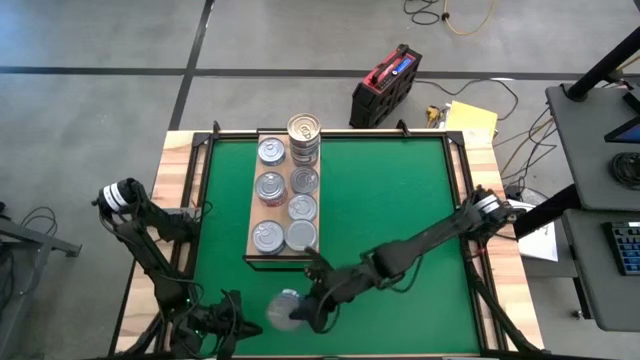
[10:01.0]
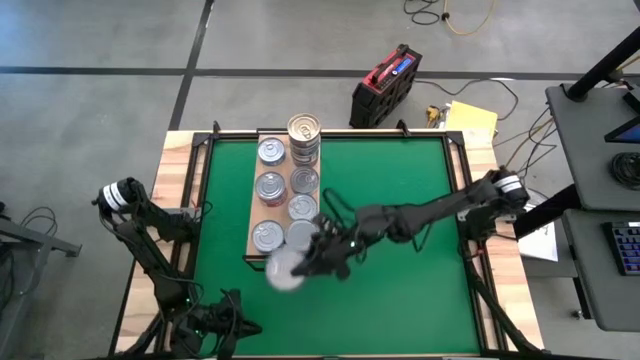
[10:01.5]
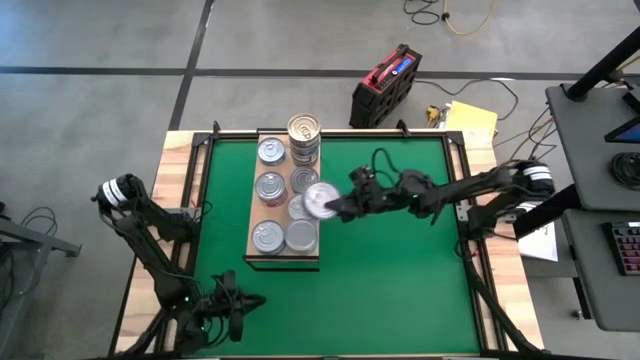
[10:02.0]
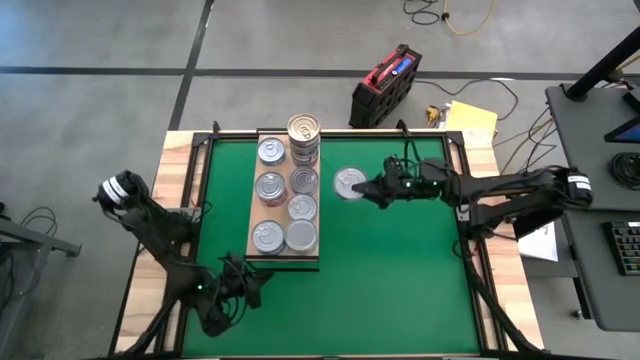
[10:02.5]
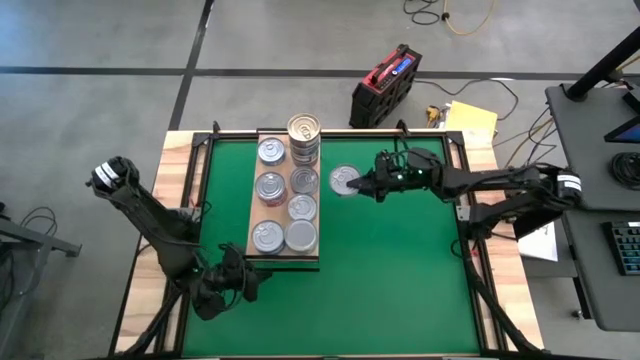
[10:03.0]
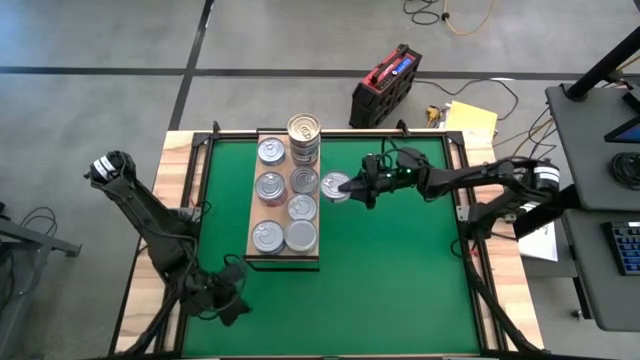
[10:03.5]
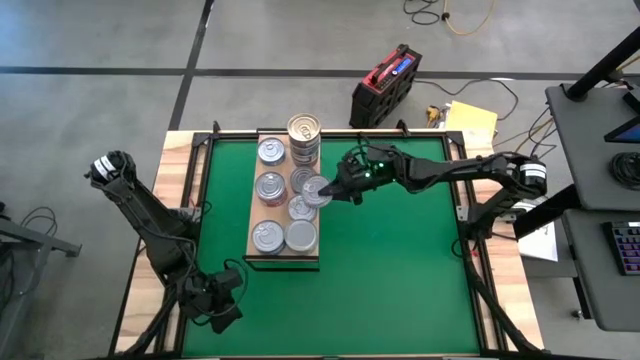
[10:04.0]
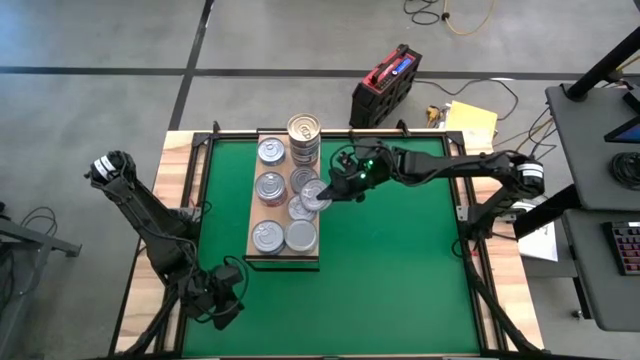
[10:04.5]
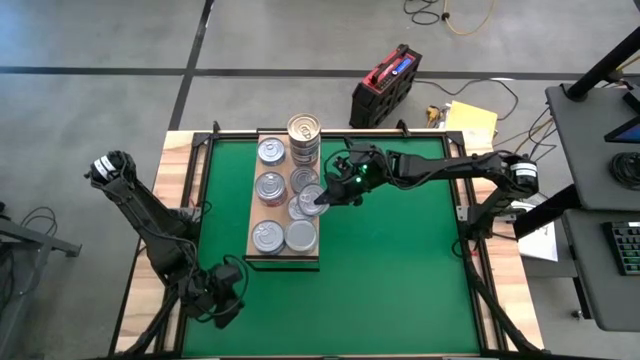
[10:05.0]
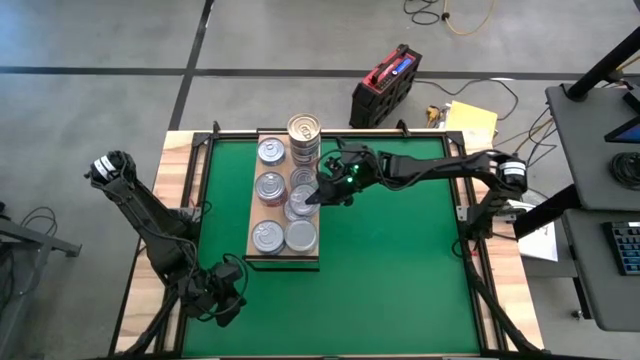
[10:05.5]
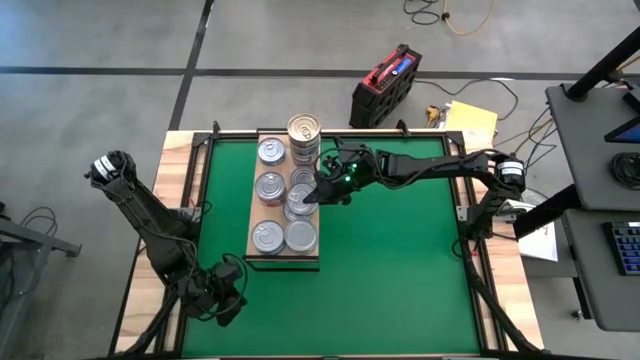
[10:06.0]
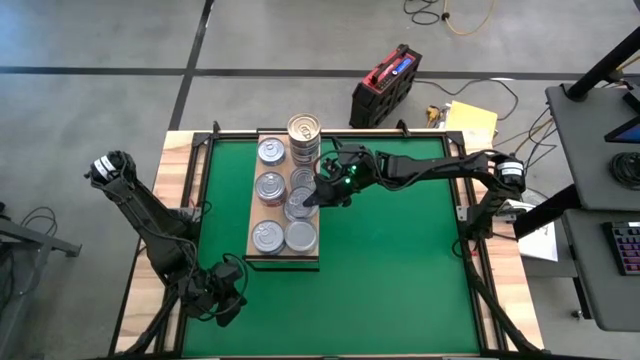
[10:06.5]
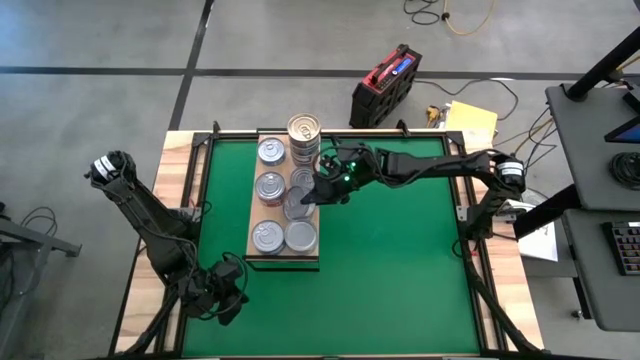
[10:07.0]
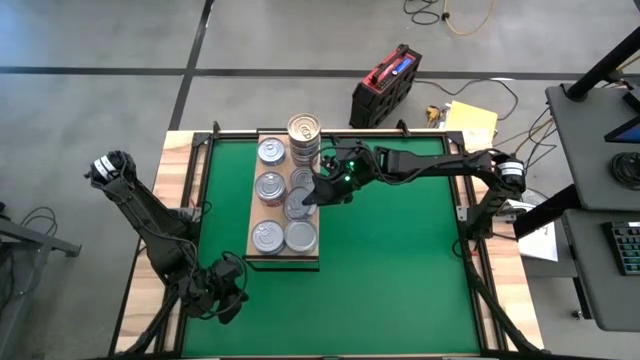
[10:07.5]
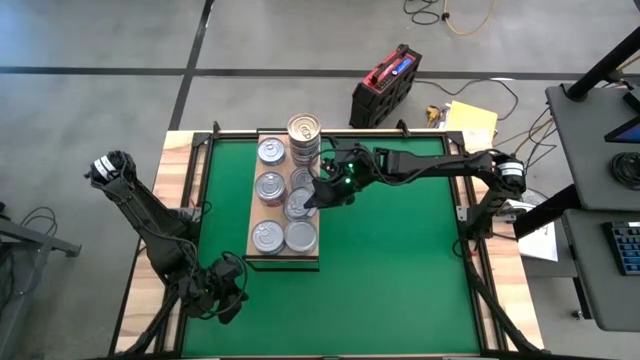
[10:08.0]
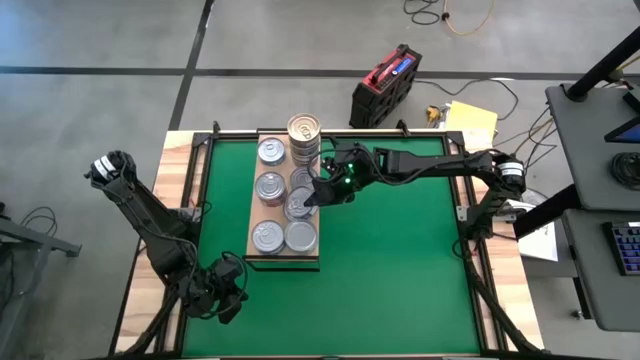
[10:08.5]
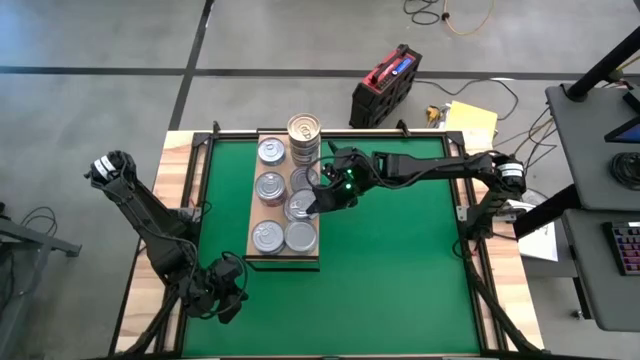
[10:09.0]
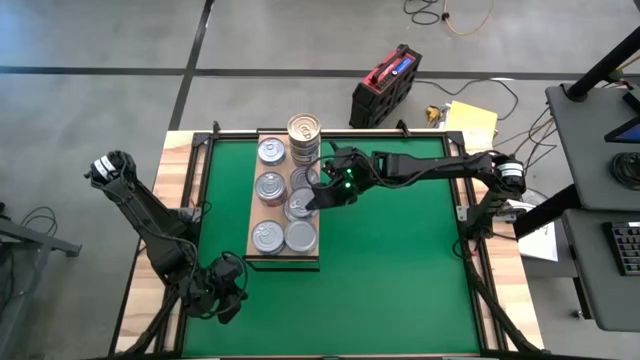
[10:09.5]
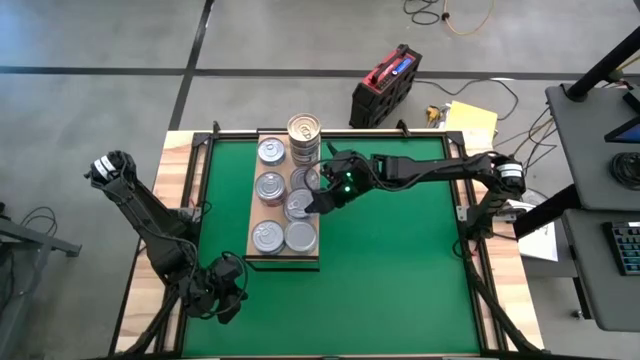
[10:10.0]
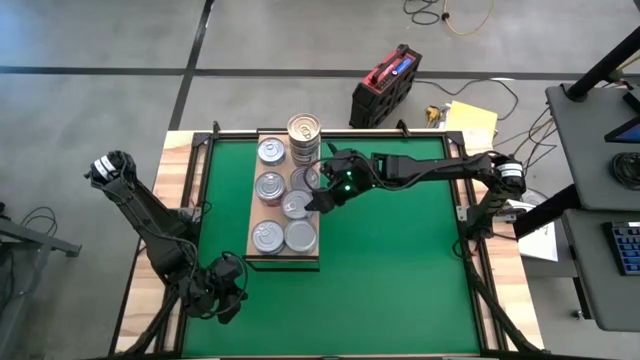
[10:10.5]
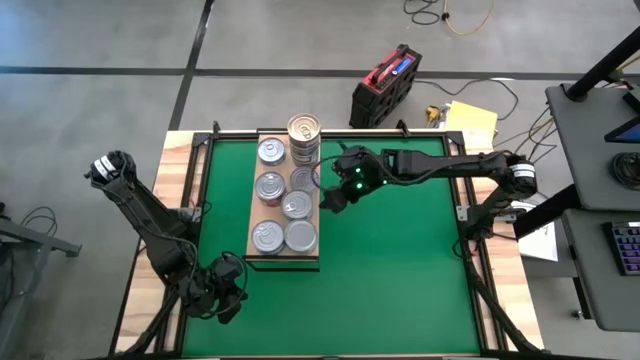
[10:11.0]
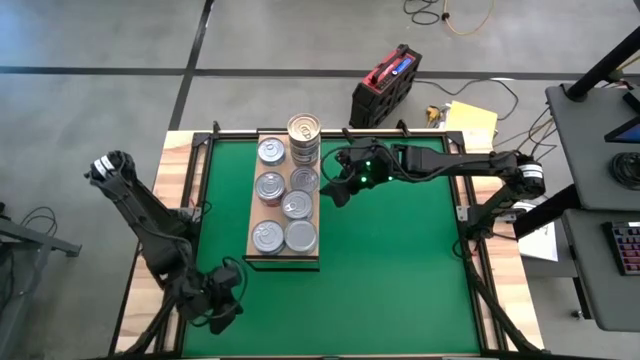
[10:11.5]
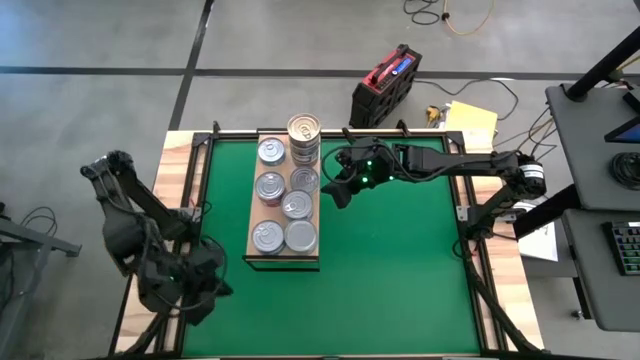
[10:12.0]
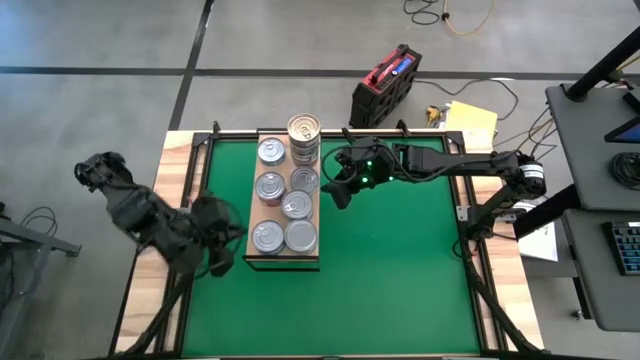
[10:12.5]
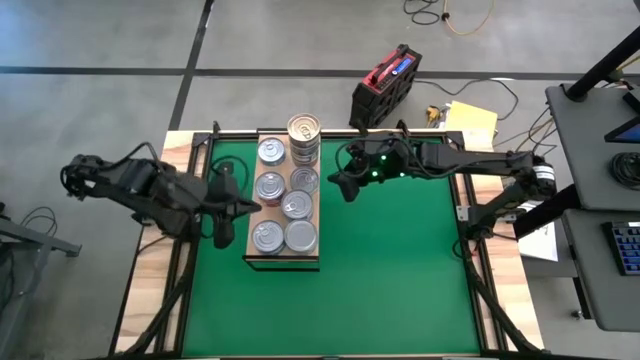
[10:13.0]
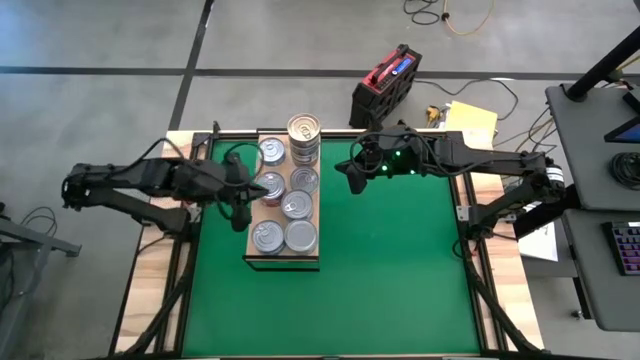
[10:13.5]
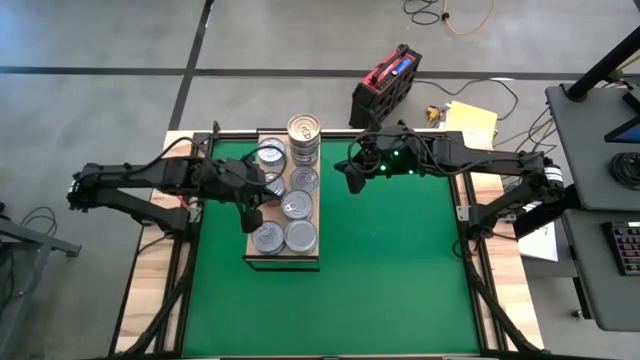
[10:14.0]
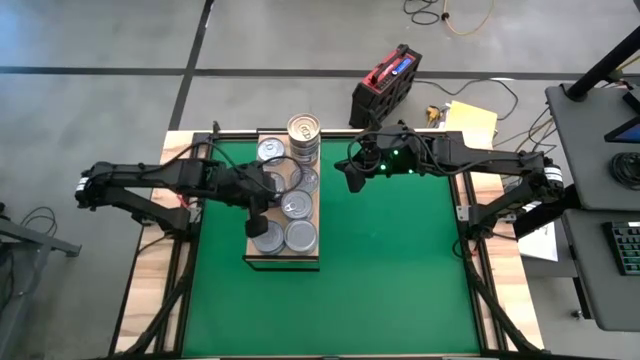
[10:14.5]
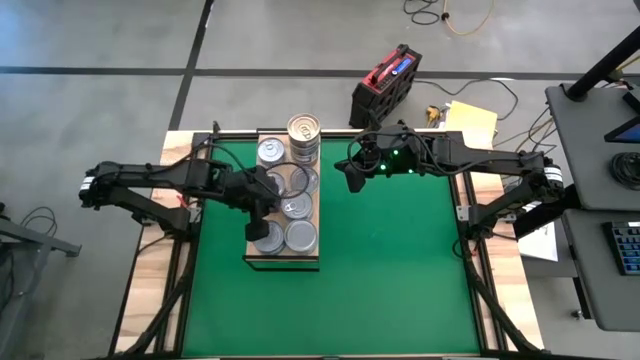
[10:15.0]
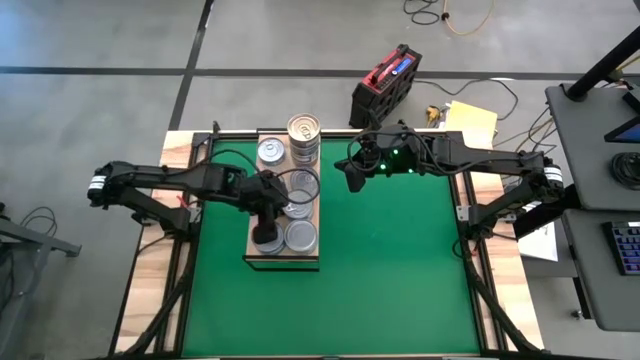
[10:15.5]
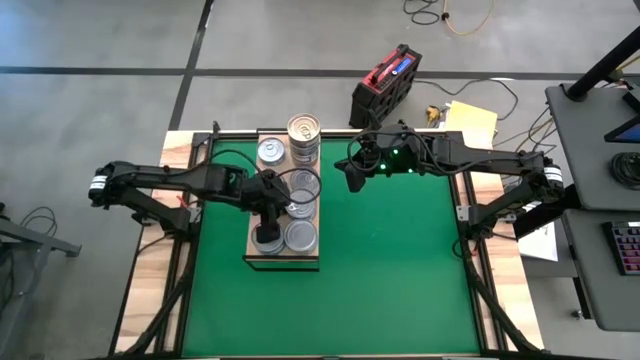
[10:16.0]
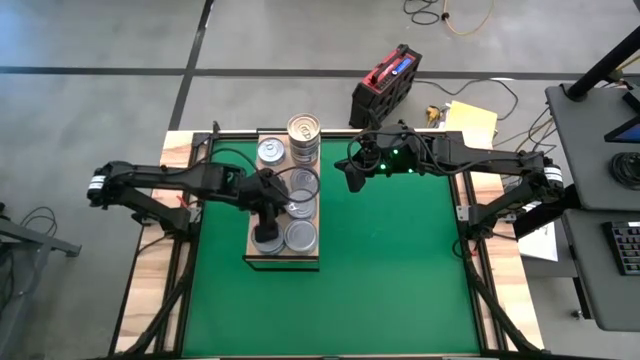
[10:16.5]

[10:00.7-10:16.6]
Task: Stack canned seafood by type on shelf
Stack the blue tuna can on top of the blue tuna can on the shelf

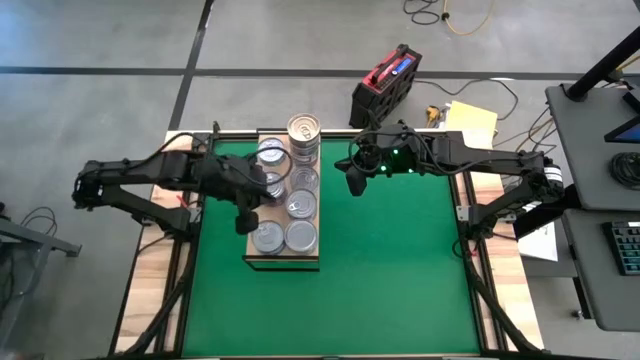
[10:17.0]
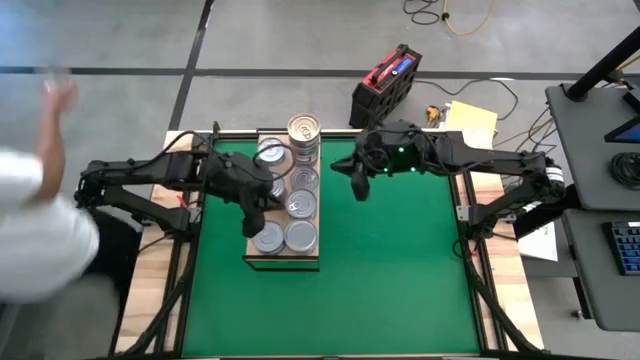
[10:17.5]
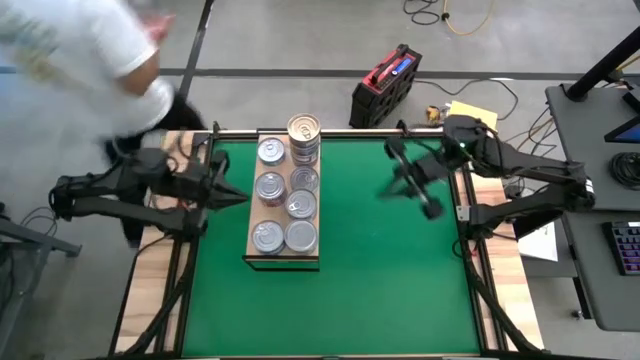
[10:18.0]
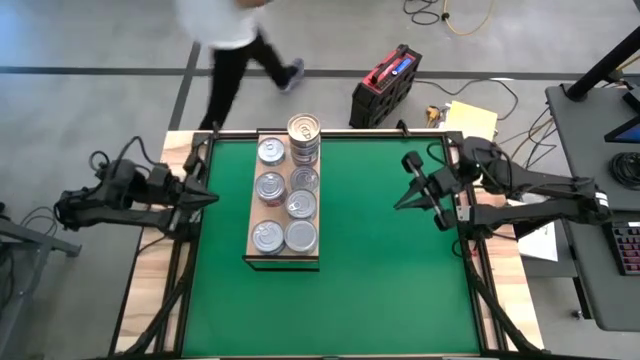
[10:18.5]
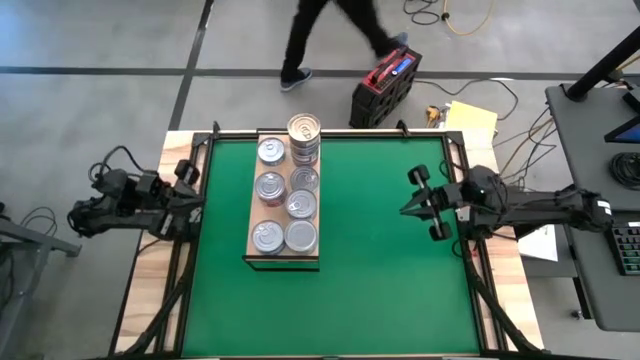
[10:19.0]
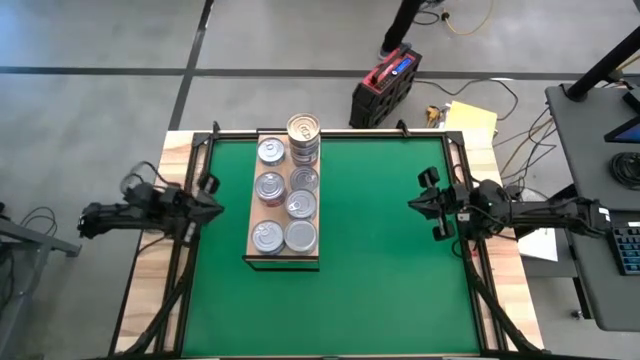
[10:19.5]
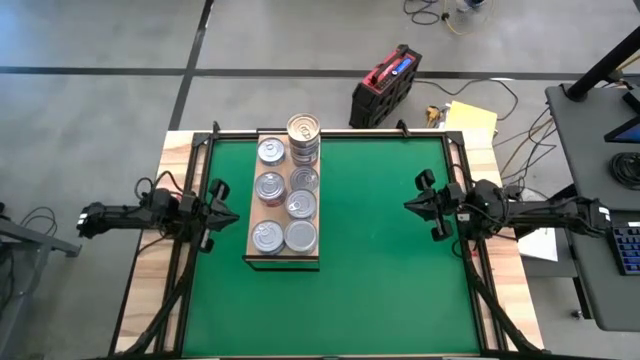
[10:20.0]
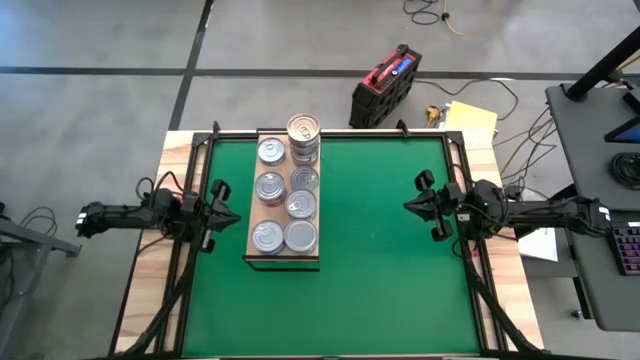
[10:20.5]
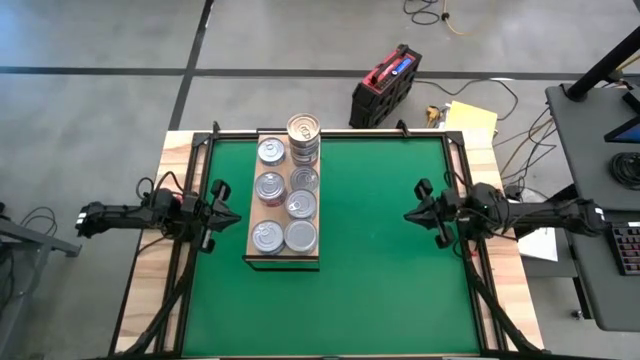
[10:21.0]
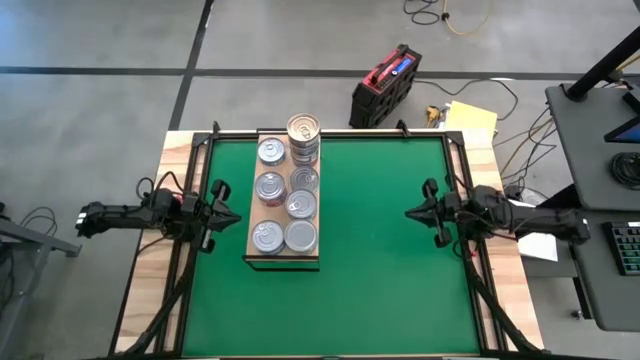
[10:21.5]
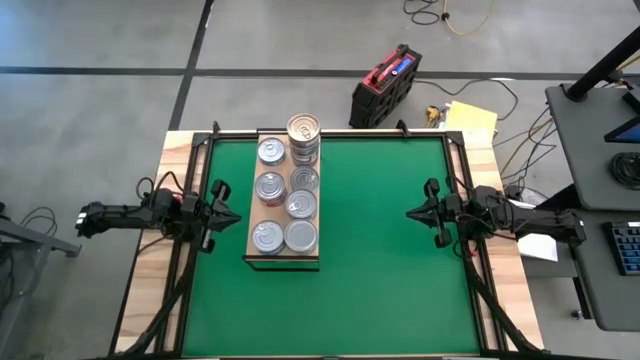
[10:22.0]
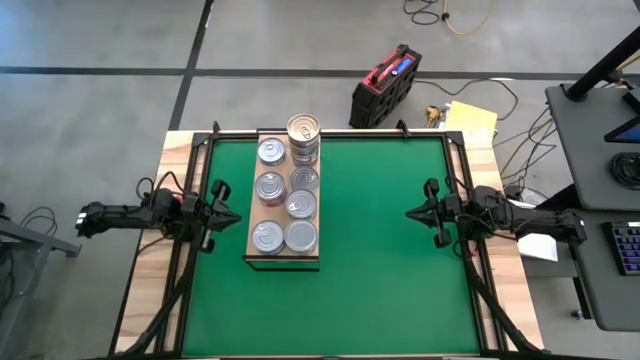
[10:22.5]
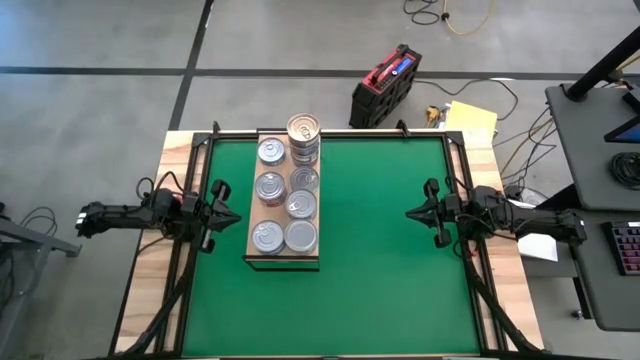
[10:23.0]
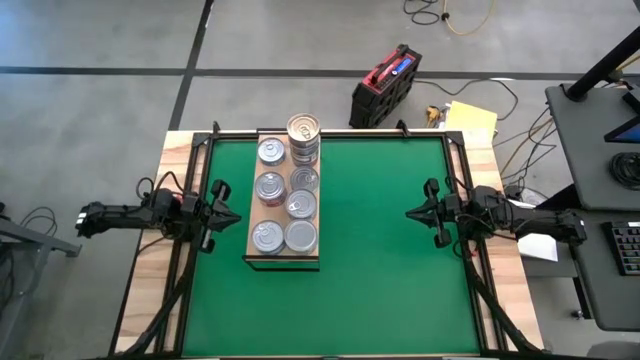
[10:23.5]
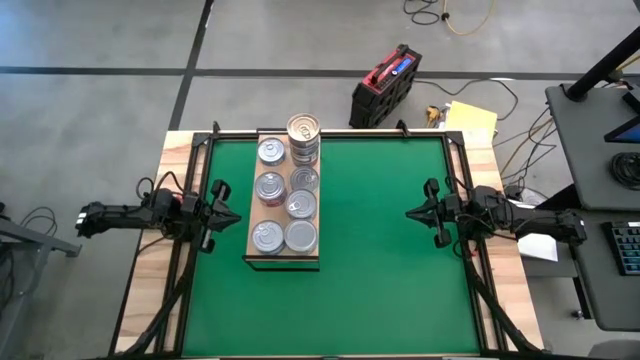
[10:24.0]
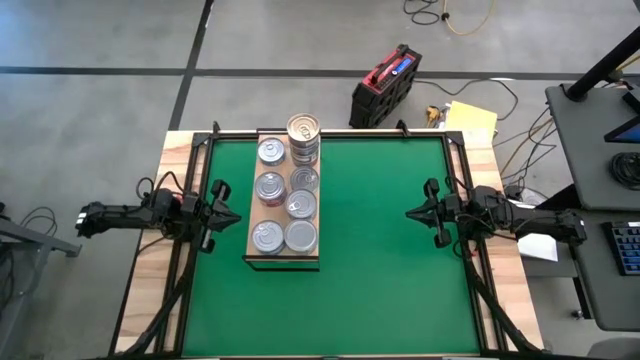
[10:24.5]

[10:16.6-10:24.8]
Return to Home Position
